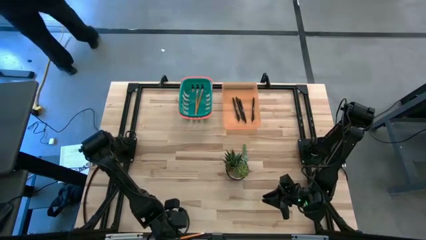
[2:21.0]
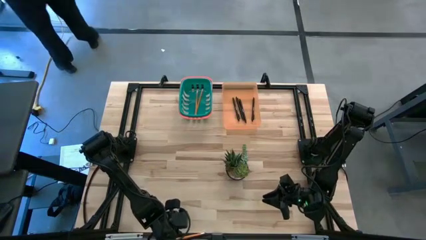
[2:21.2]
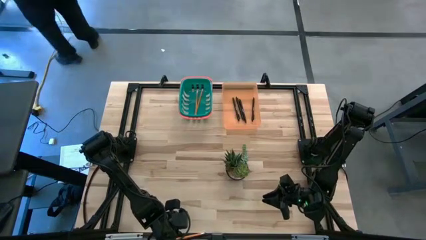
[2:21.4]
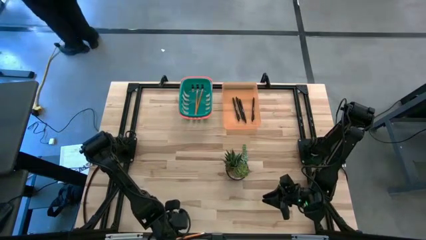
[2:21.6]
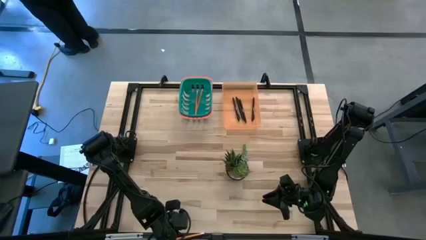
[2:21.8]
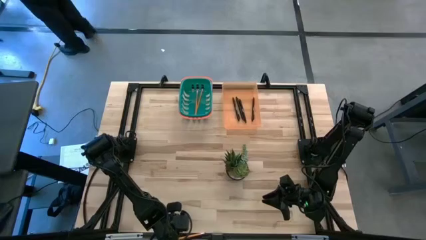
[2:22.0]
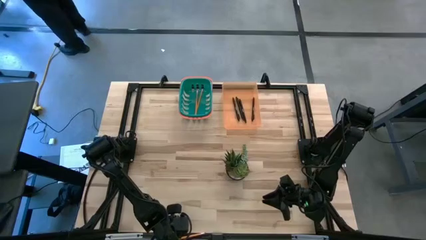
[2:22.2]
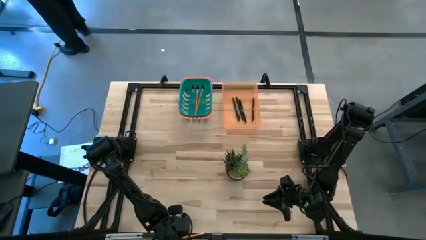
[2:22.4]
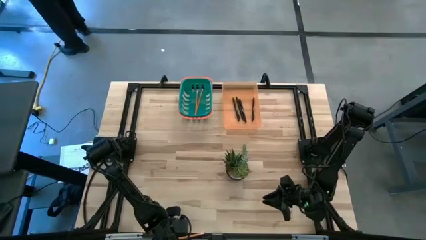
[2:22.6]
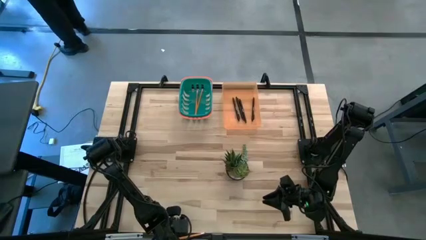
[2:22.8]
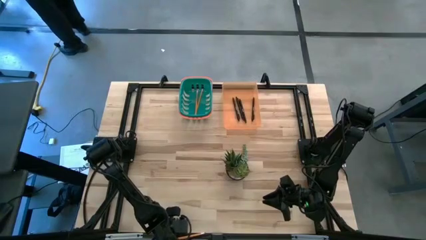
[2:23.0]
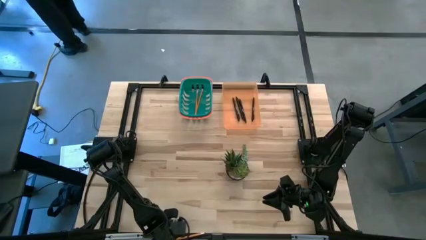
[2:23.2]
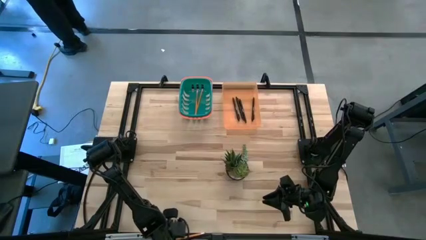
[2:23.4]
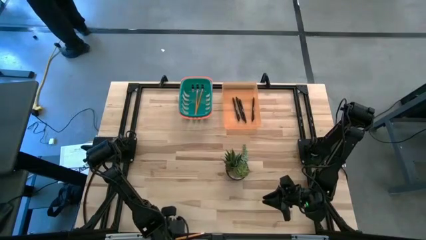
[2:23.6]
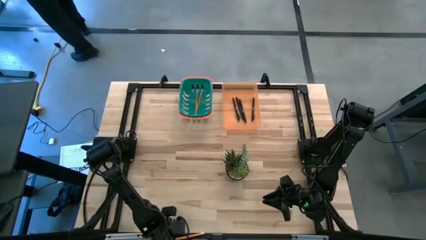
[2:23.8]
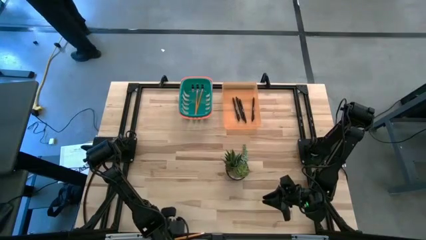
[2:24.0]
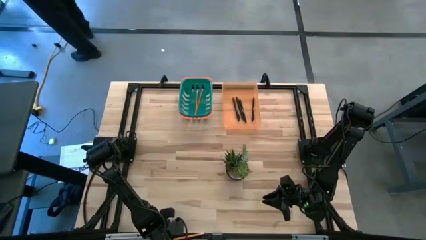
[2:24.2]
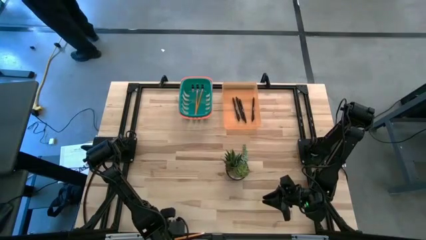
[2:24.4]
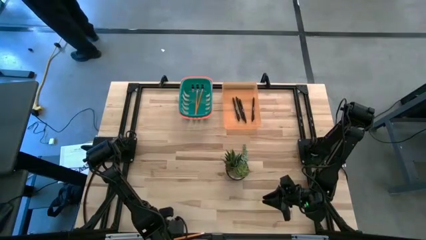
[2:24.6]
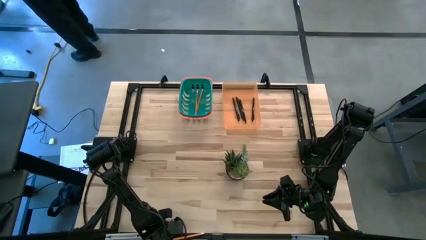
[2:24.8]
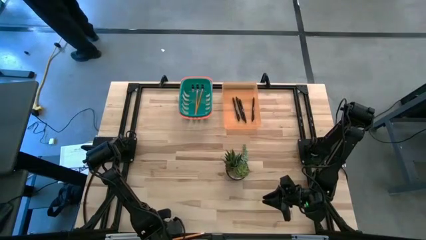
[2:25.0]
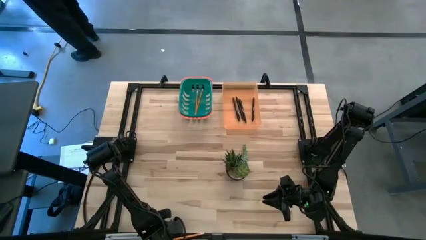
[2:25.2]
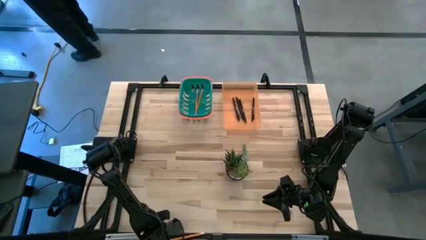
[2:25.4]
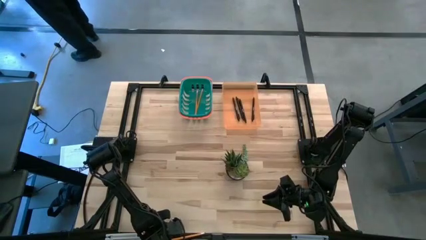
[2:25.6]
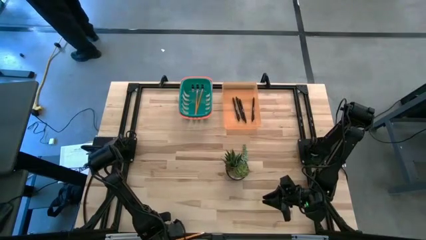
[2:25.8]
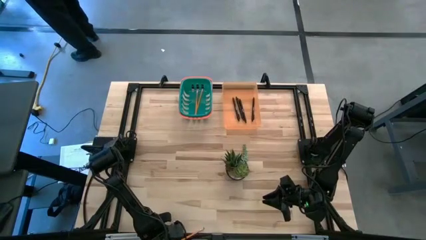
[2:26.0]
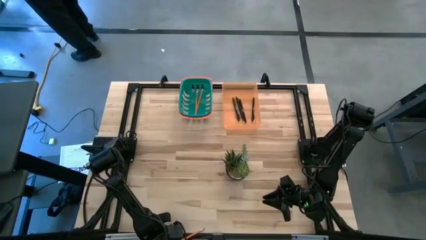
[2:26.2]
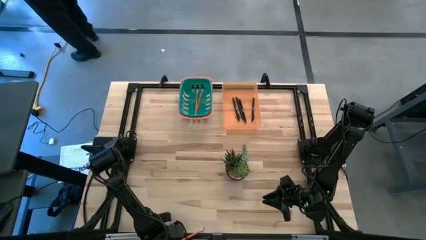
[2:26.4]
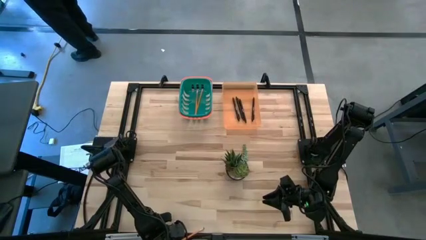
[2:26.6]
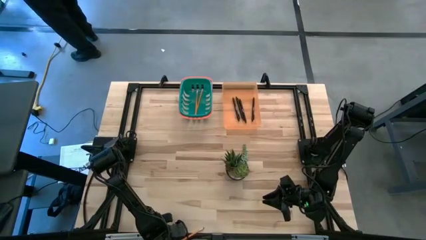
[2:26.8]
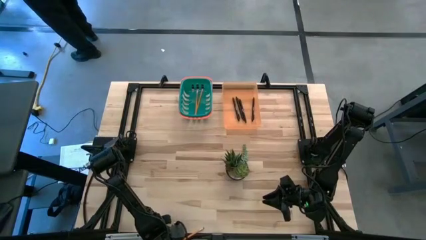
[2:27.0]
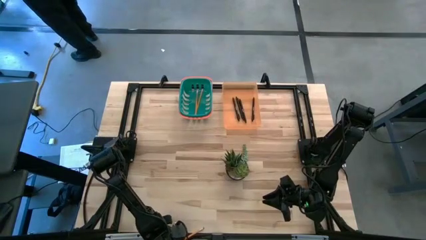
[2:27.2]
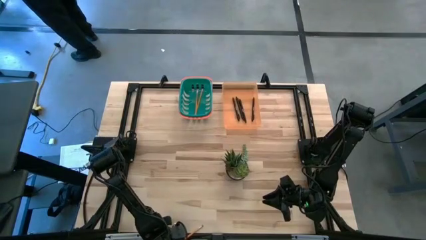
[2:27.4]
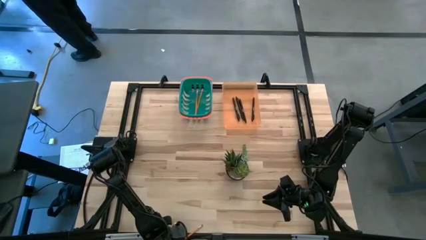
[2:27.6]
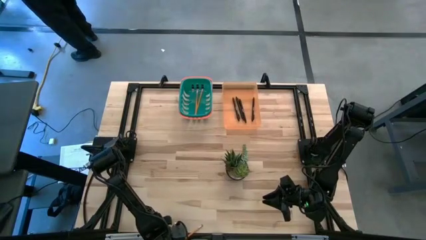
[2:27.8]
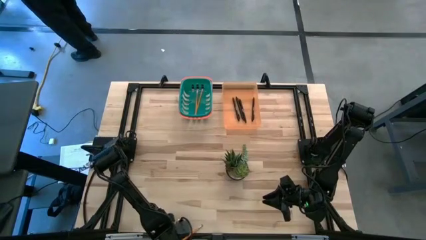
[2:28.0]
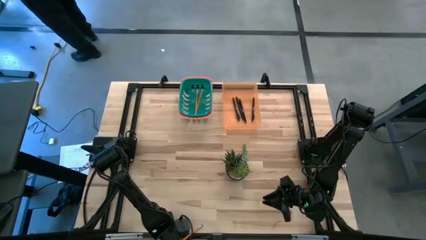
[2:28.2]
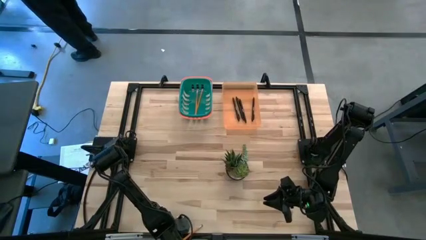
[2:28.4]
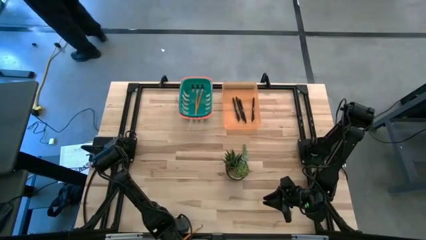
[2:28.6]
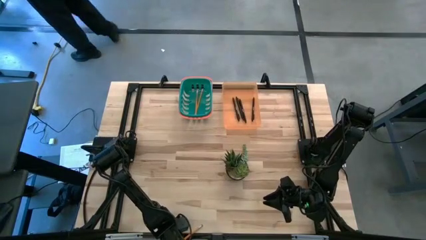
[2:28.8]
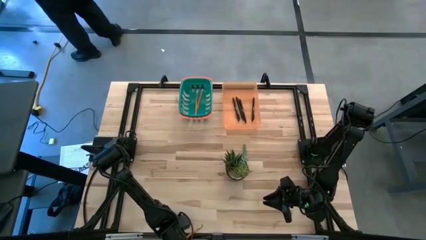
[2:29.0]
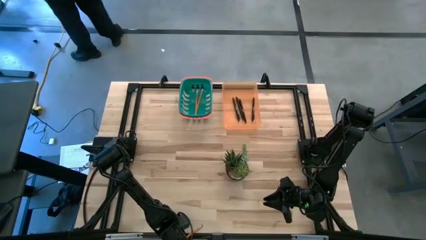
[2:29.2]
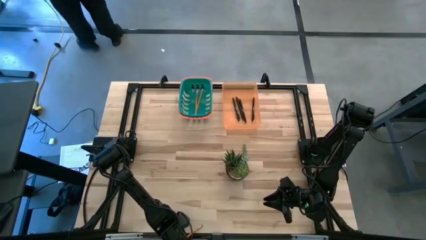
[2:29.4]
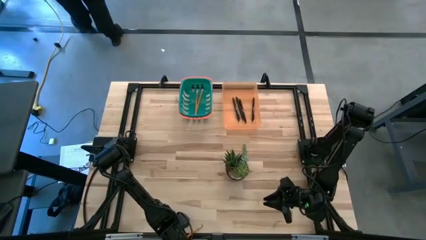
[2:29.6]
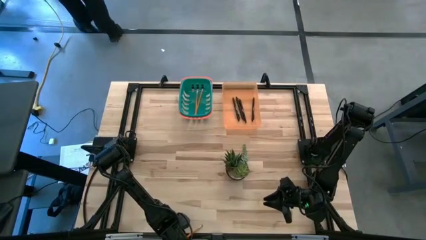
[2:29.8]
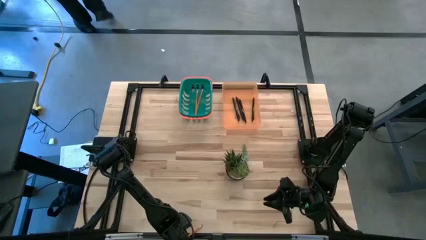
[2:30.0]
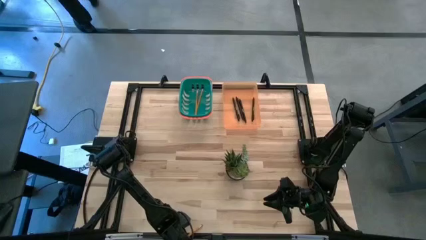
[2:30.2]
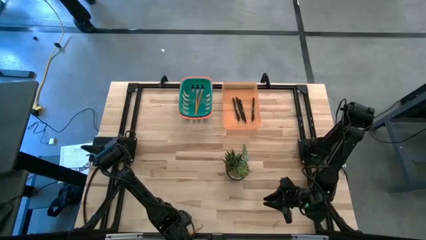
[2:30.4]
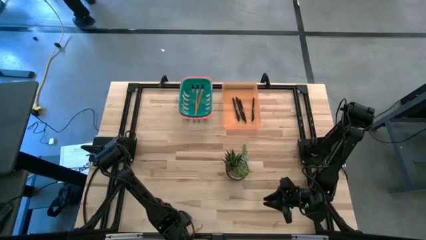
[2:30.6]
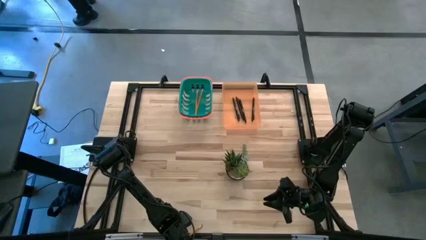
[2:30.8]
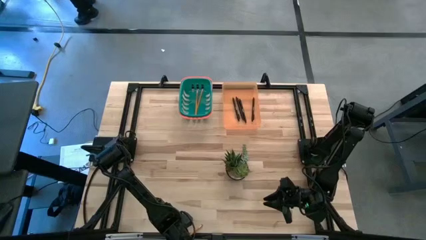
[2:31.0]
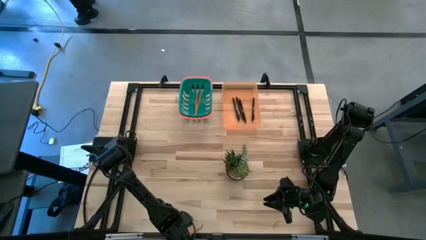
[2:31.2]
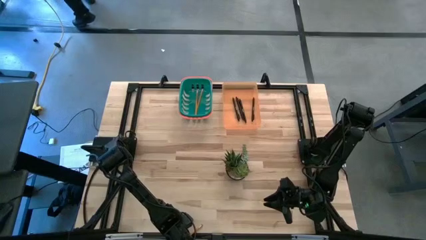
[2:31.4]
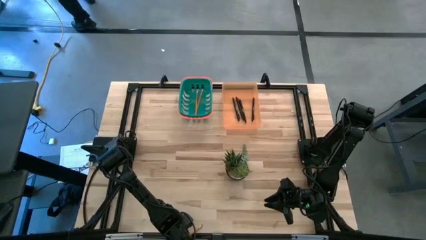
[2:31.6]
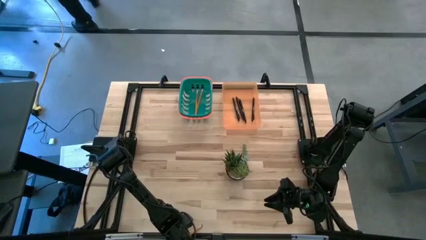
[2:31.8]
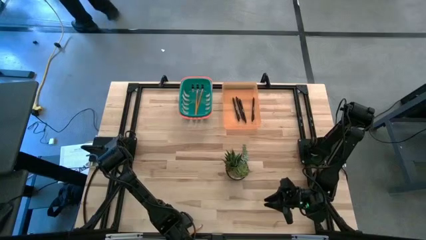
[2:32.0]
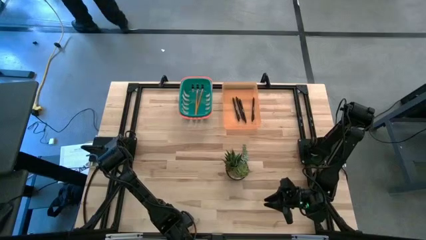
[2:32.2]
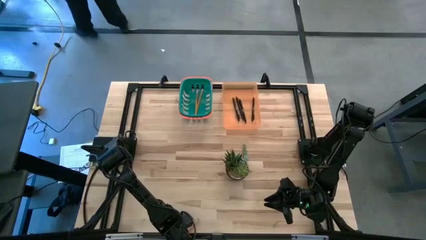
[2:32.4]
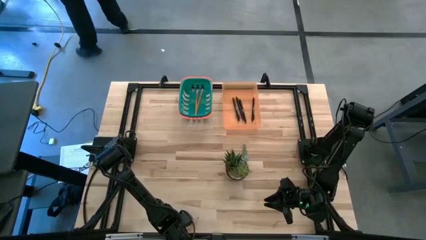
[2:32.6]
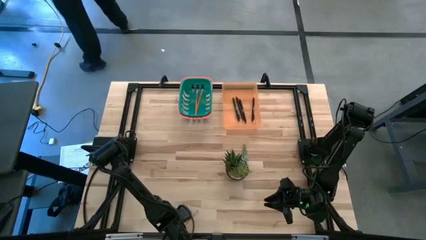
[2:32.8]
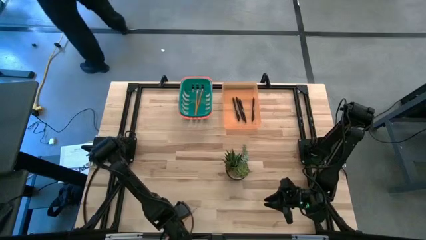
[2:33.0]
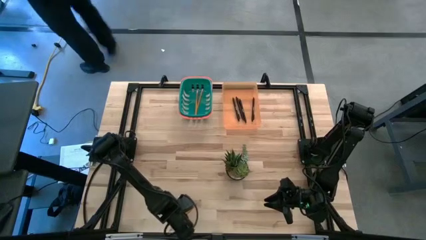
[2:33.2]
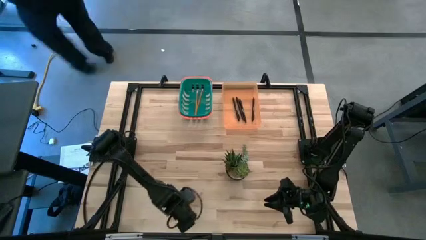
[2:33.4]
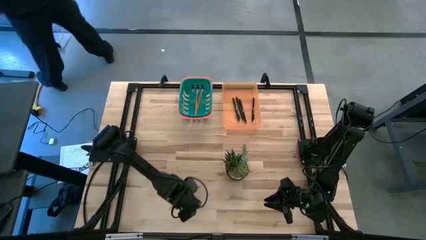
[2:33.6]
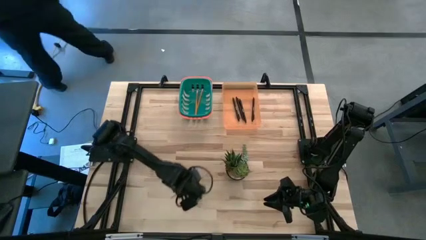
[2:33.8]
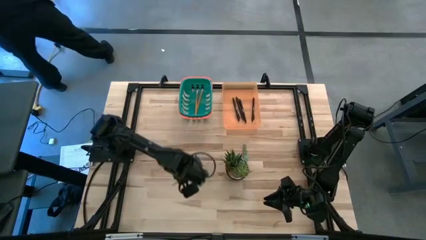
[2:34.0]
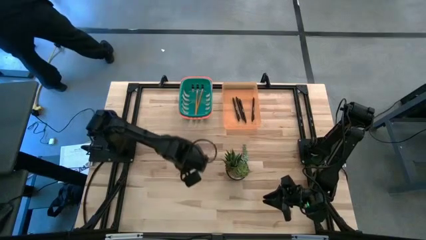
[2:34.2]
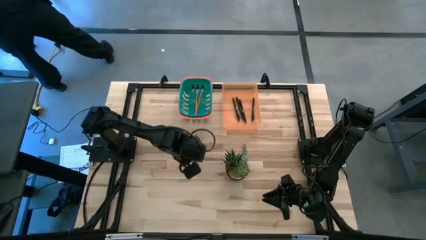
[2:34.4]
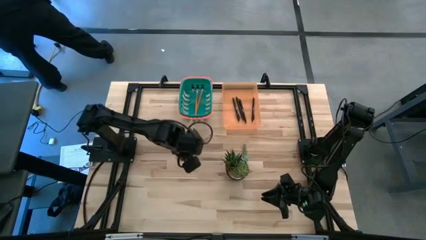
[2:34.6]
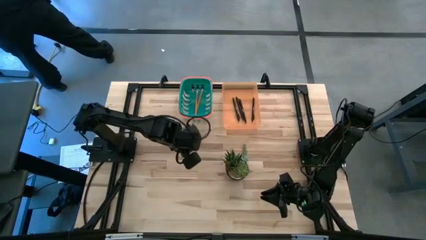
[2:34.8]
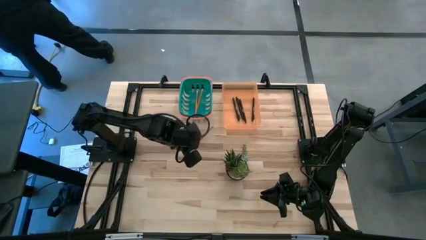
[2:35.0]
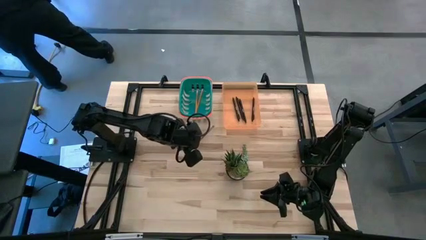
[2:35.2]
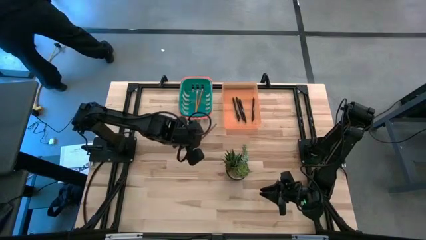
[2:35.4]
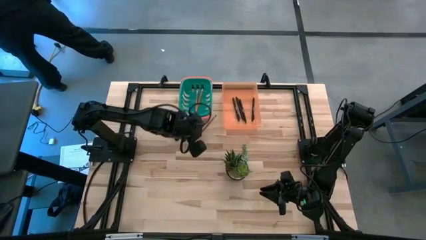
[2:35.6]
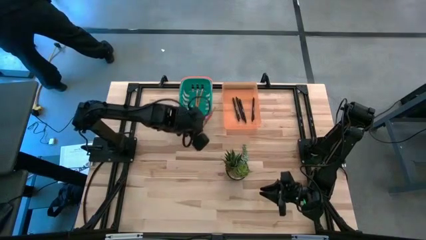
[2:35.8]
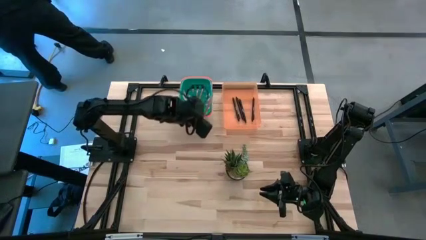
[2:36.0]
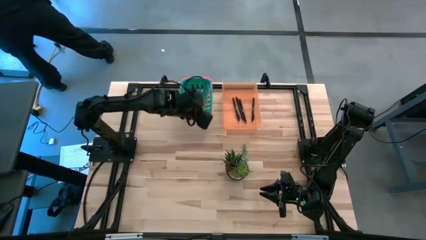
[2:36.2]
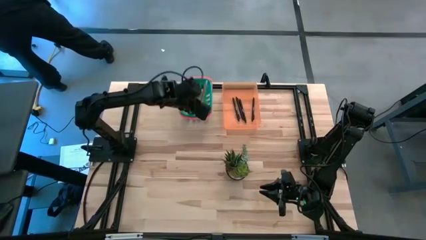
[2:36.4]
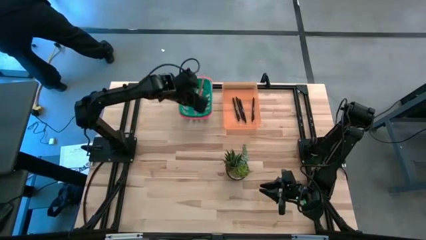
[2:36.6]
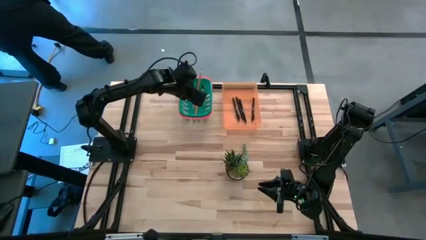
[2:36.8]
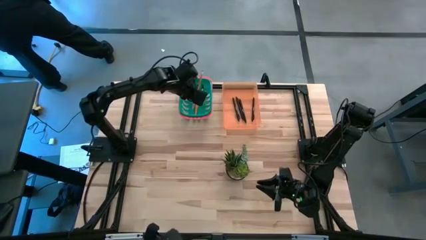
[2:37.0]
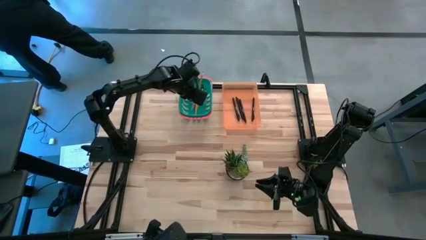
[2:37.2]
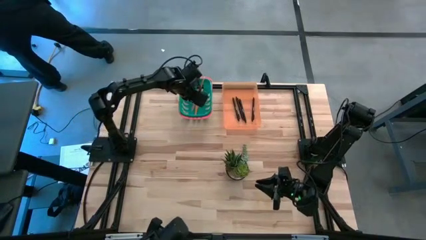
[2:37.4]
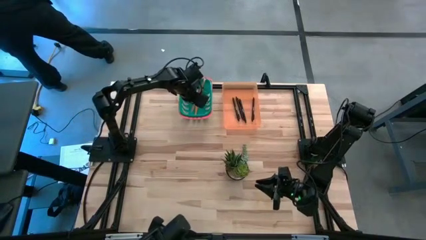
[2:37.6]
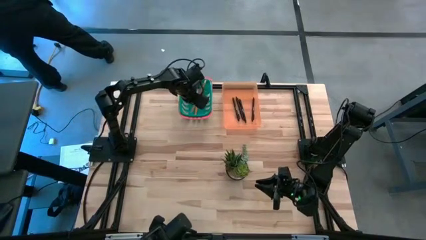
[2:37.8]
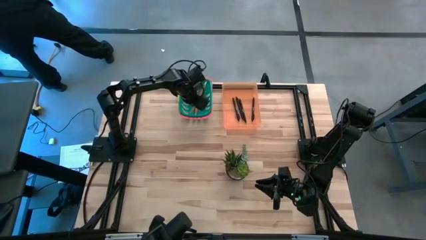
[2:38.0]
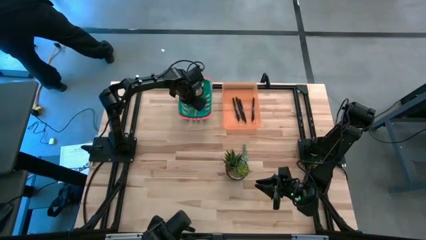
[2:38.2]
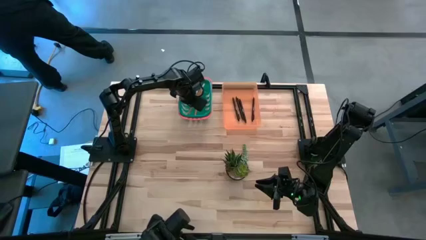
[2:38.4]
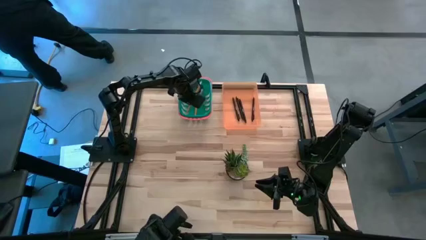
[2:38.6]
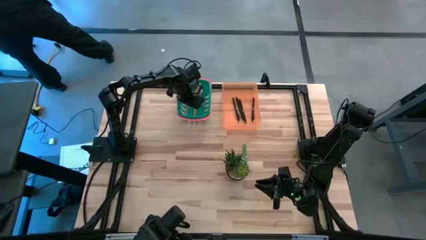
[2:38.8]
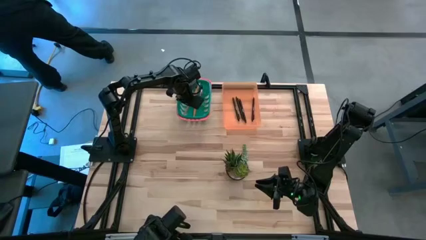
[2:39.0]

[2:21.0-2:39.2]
Task: Sort pens & pencils
Put the pencil into the green bin
